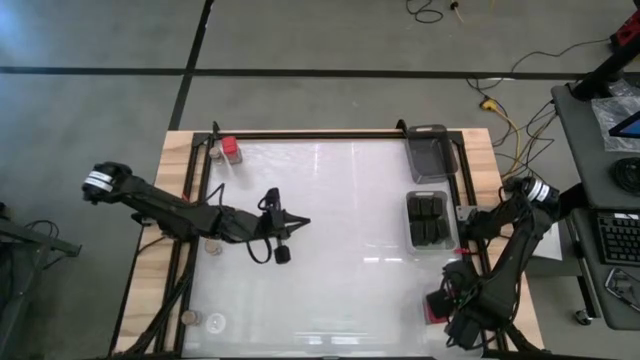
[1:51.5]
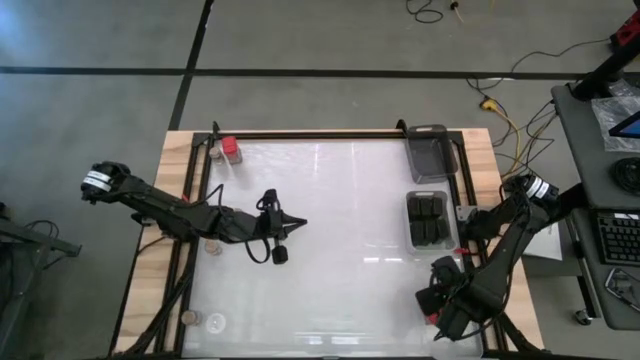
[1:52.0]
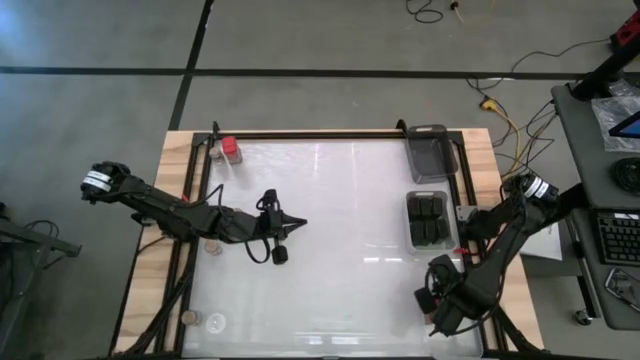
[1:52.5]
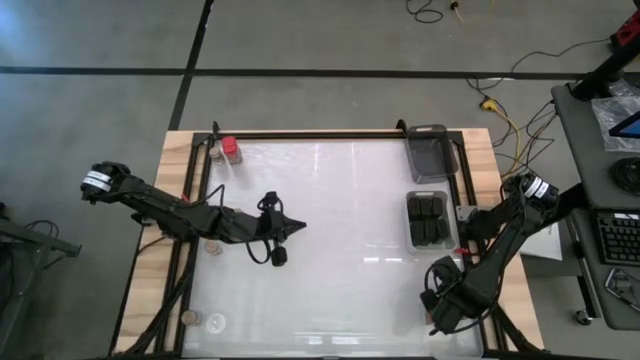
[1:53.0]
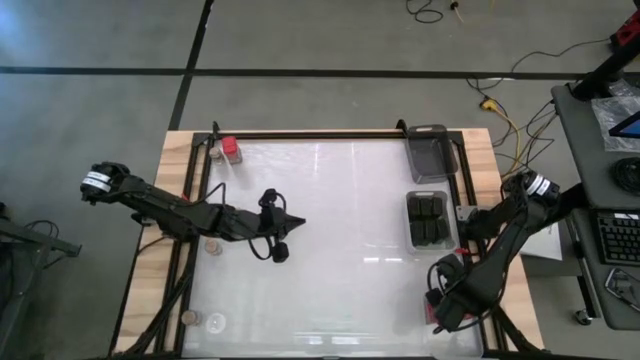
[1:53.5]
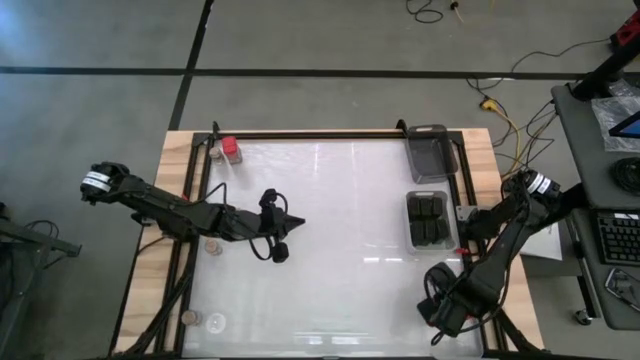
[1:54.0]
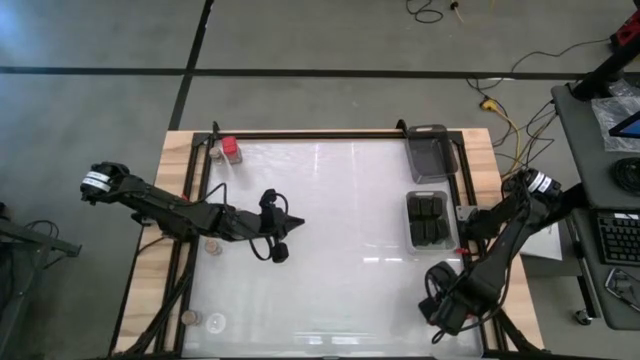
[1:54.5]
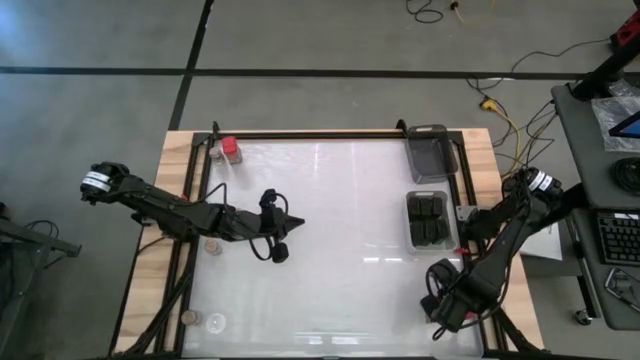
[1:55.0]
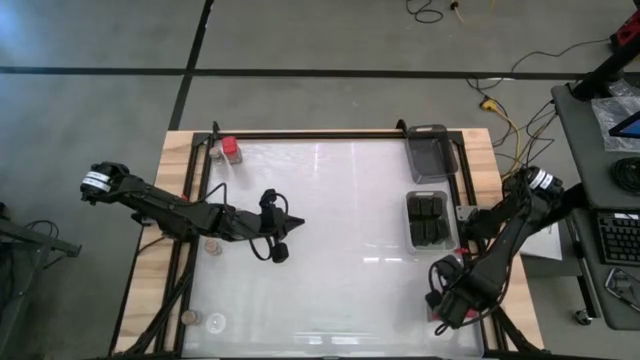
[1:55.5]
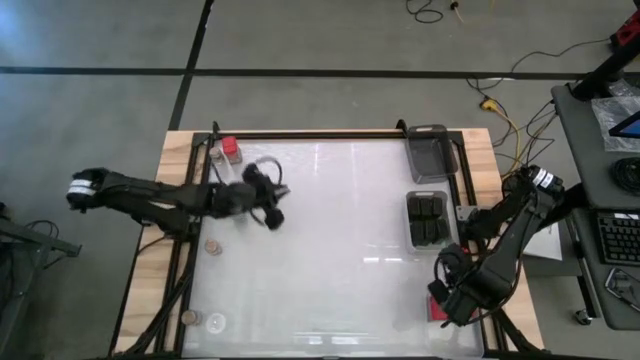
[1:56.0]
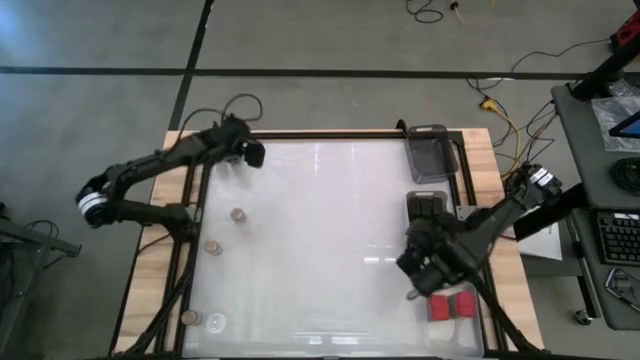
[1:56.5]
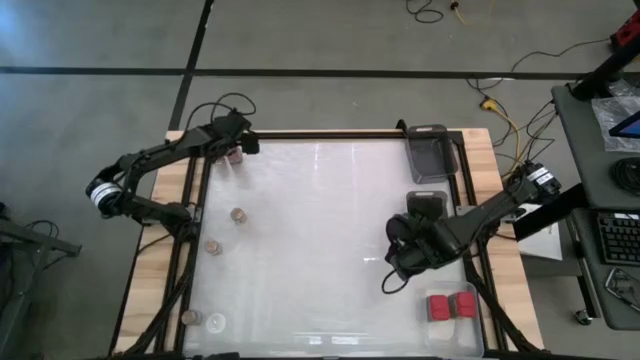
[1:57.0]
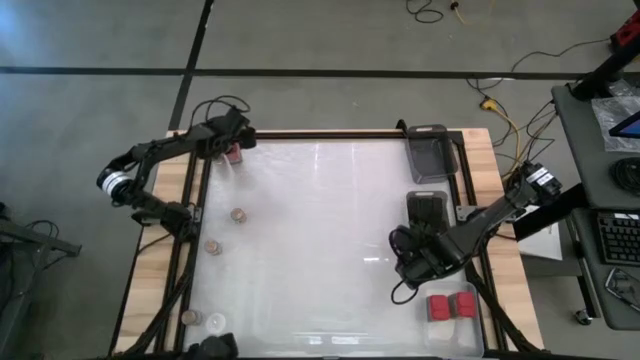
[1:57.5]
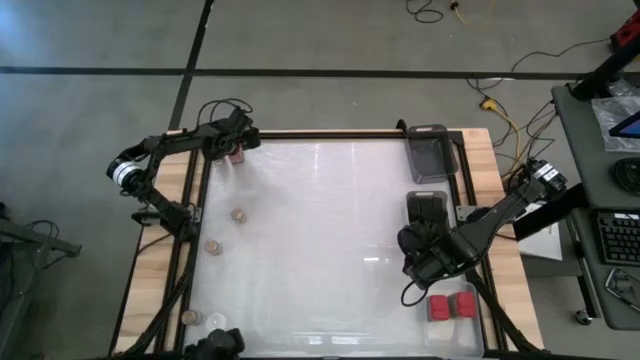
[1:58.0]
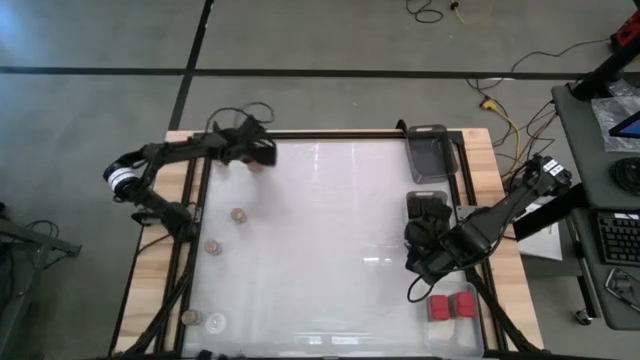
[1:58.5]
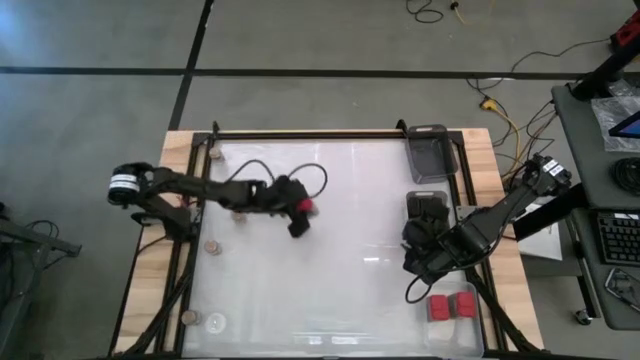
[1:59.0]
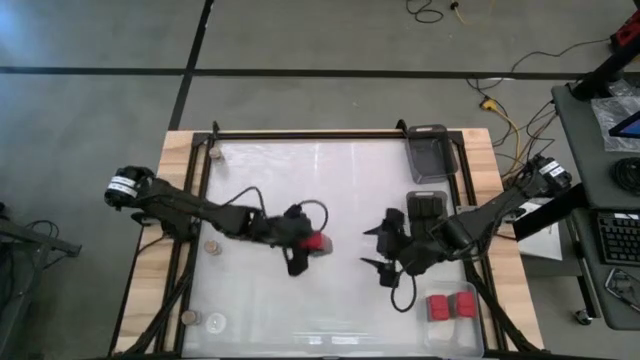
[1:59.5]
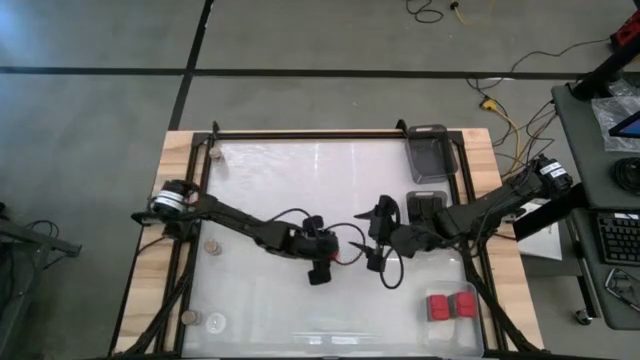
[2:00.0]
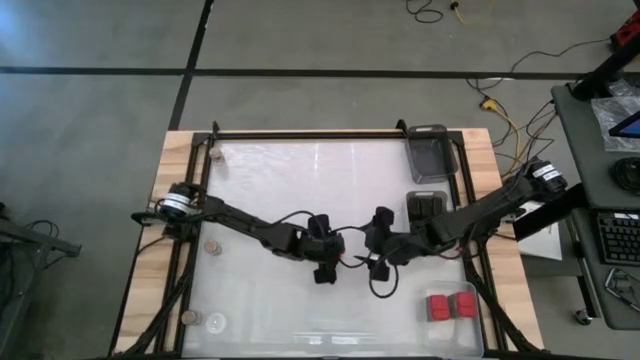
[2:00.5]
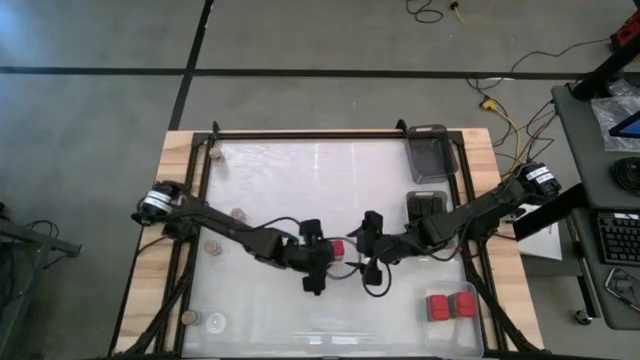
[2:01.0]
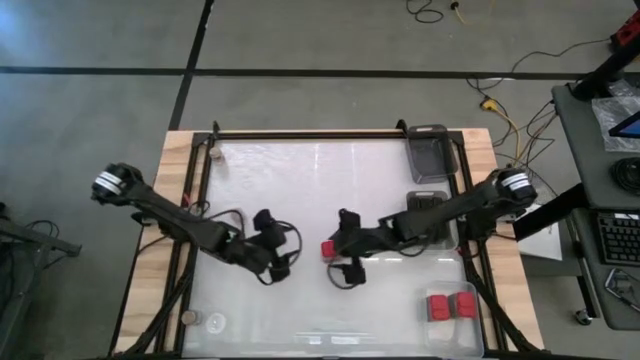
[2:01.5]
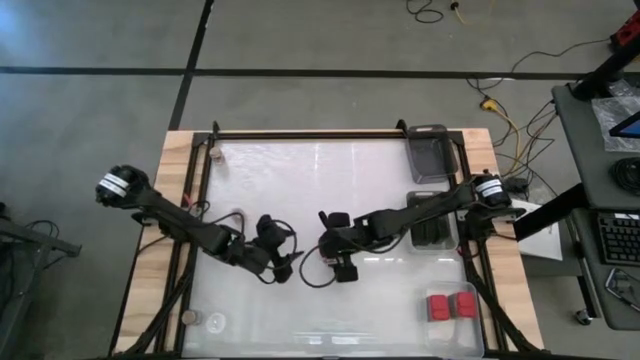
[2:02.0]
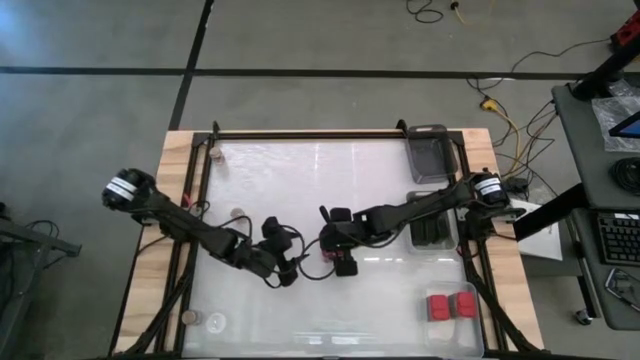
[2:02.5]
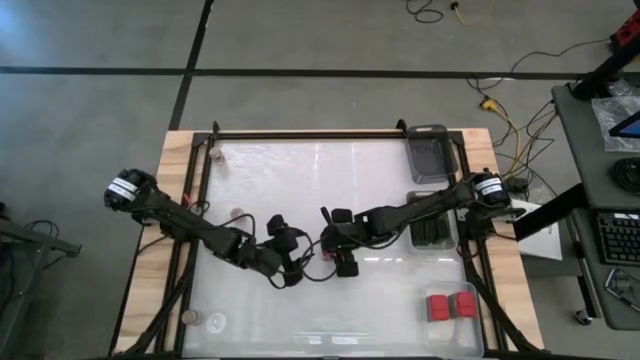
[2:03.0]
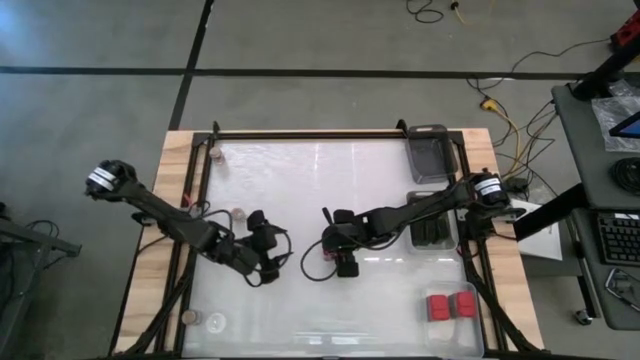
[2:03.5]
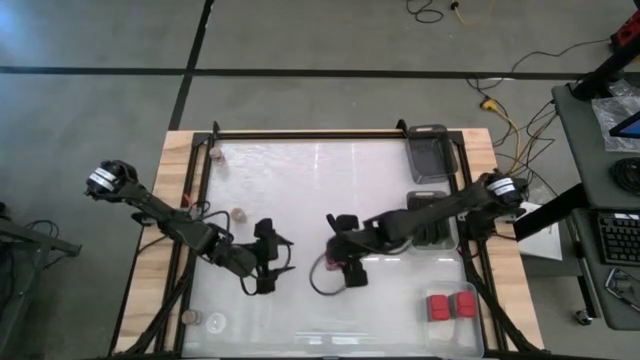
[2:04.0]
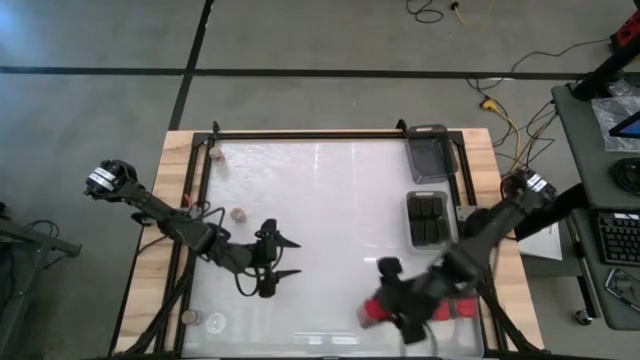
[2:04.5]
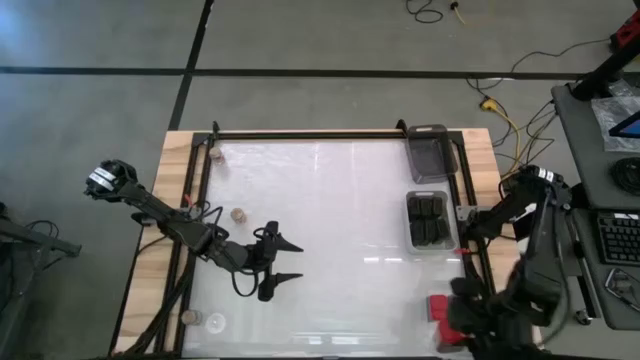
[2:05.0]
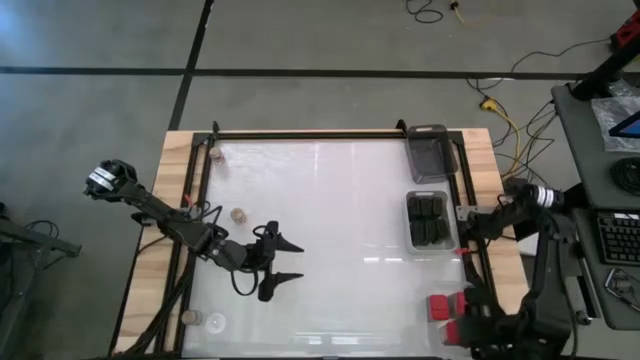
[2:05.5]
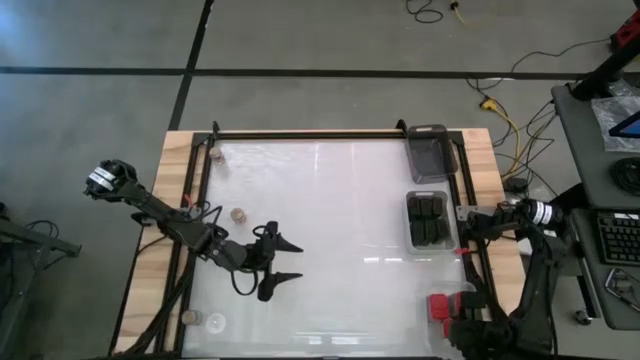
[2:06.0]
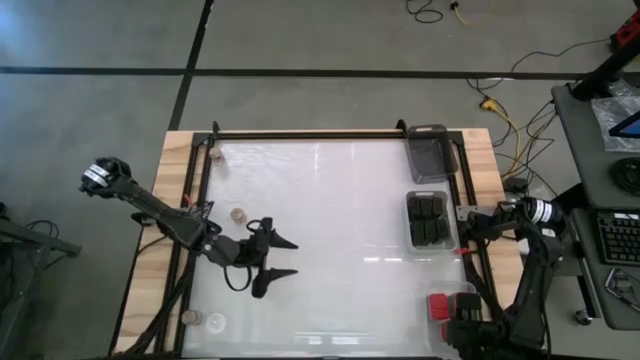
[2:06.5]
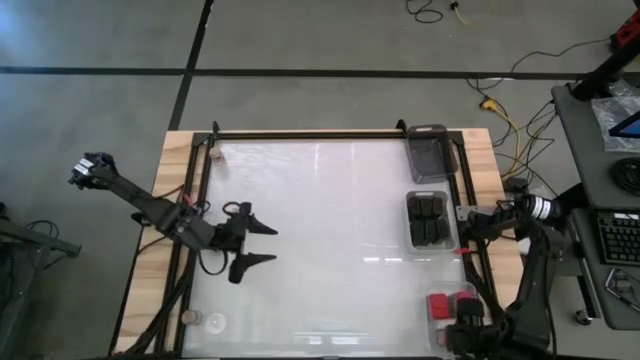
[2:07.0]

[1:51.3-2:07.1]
Task: Sort spices by type
Put the red seasoning can into the transparent bin

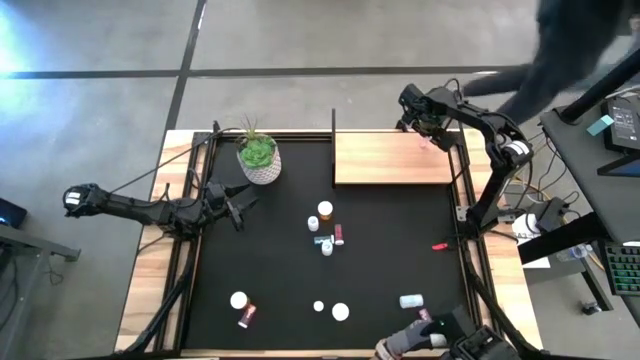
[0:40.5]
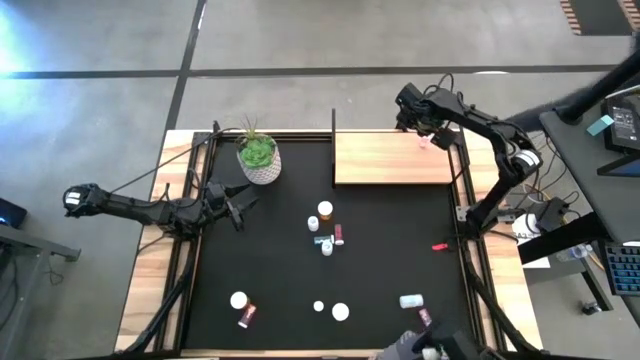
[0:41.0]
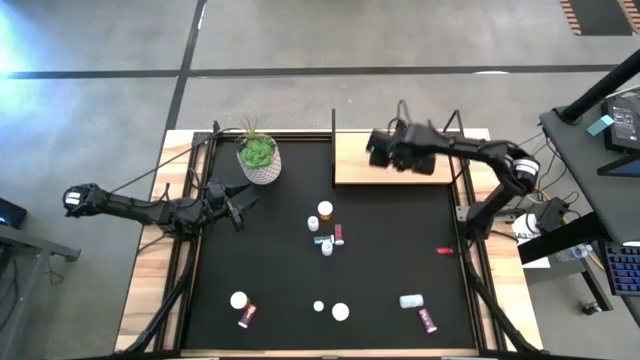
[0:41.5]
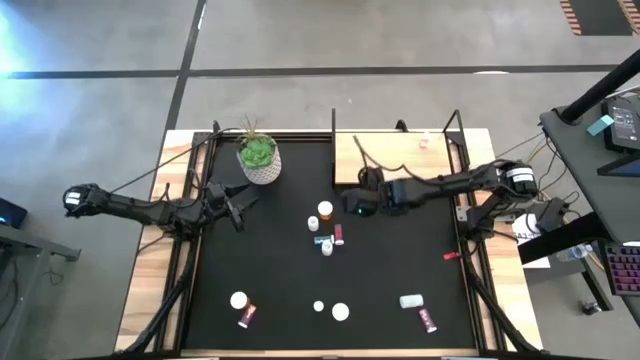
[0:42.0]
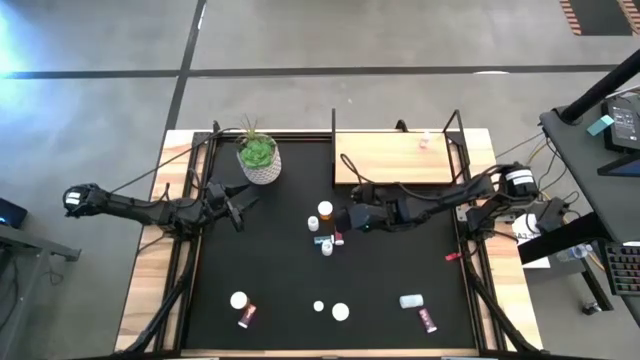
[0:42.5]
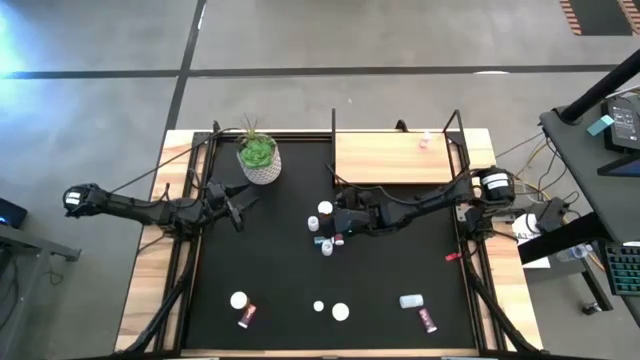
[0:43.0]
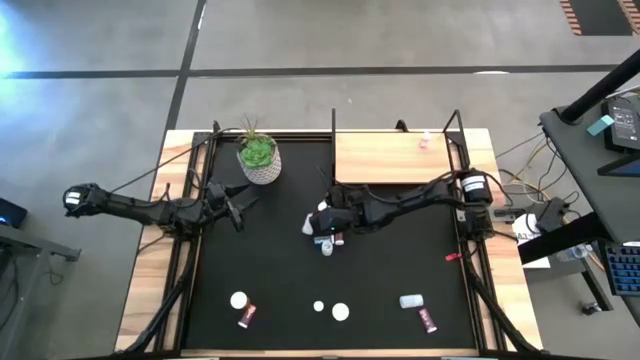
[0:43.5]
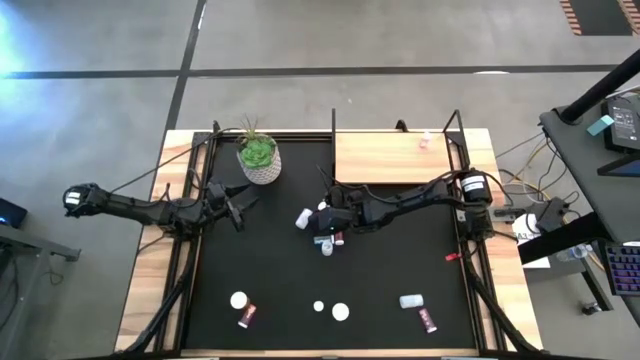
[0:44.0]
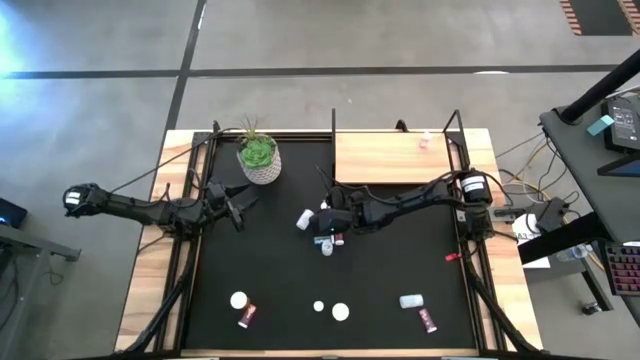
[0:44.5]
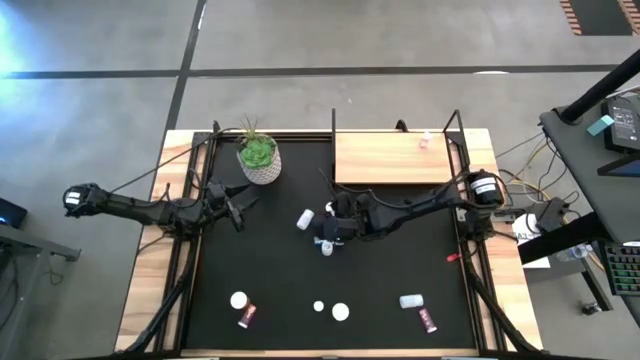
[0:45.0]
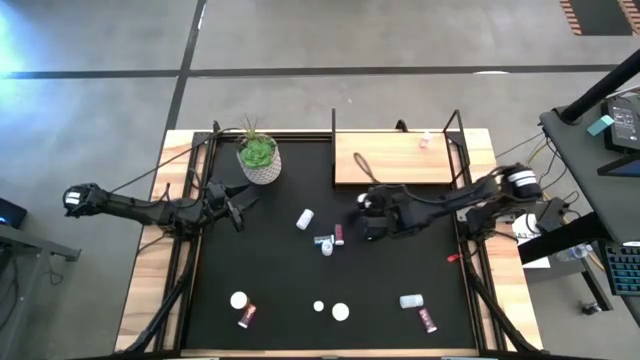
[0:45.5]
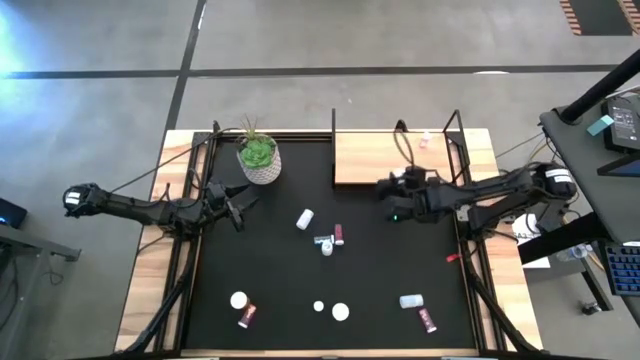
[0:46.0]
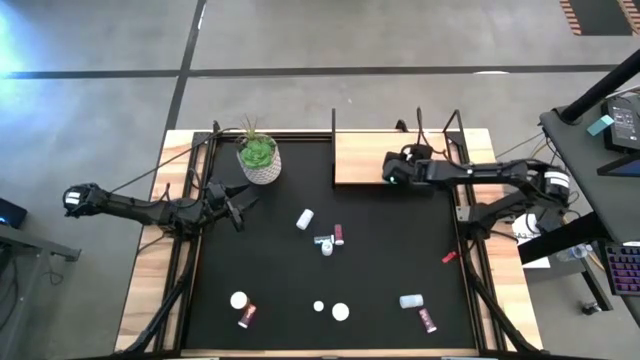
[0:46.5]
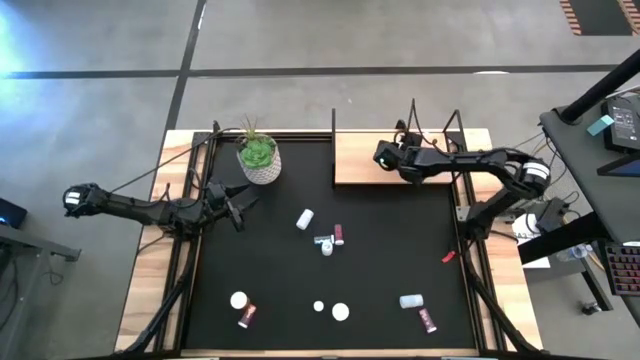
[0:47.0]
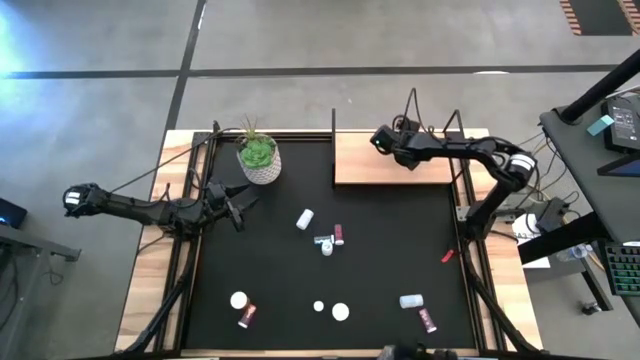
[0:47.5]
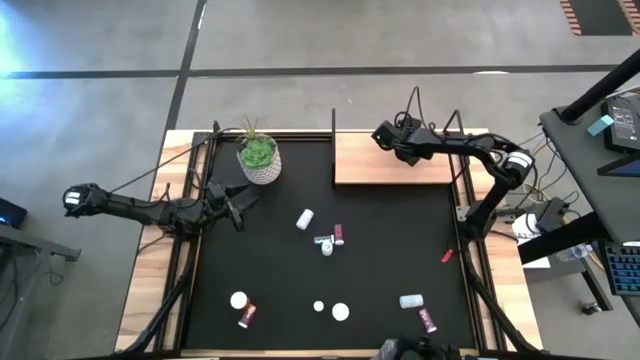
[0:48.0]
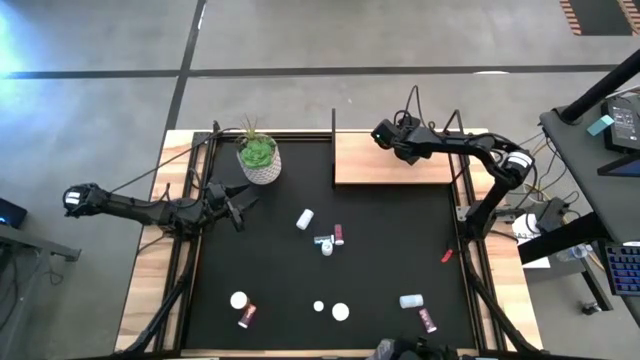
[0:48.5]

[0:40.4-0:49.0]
Task: Pick and place medicine bottles onto shelf by color
Put the top orange pill bottle on the shelf
